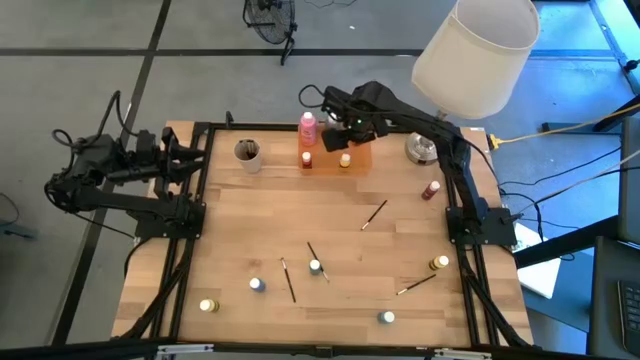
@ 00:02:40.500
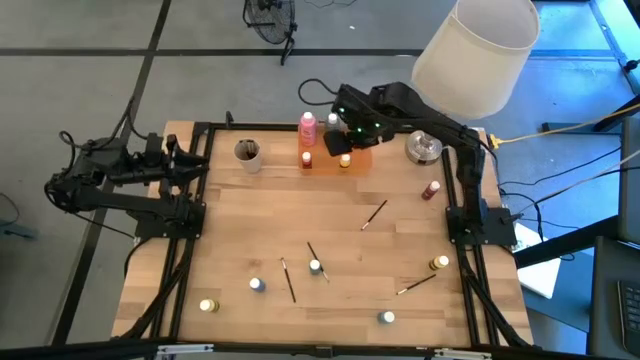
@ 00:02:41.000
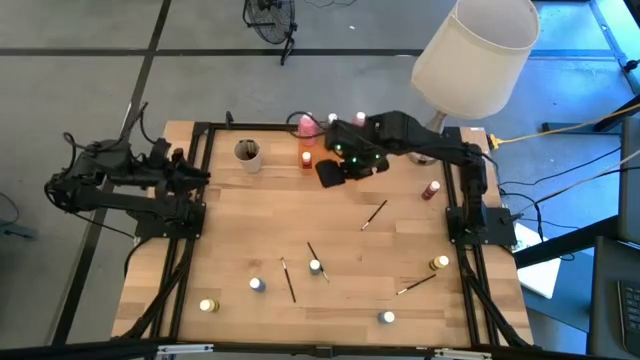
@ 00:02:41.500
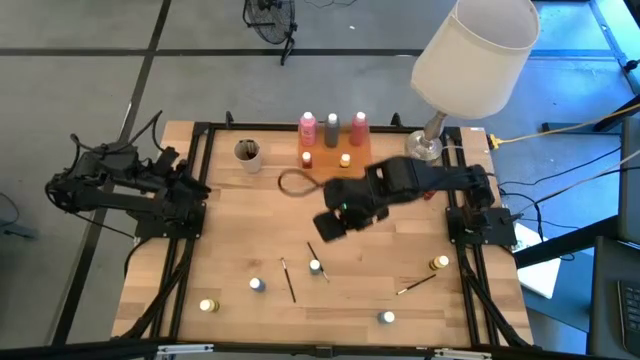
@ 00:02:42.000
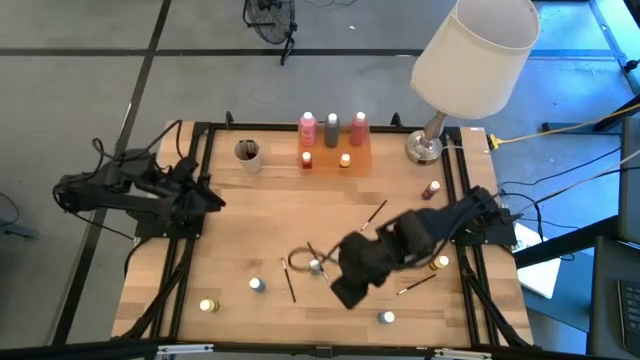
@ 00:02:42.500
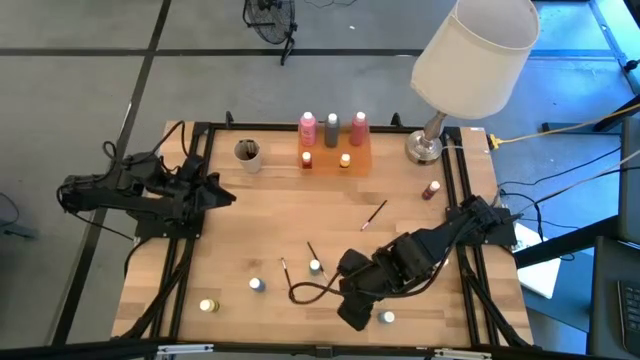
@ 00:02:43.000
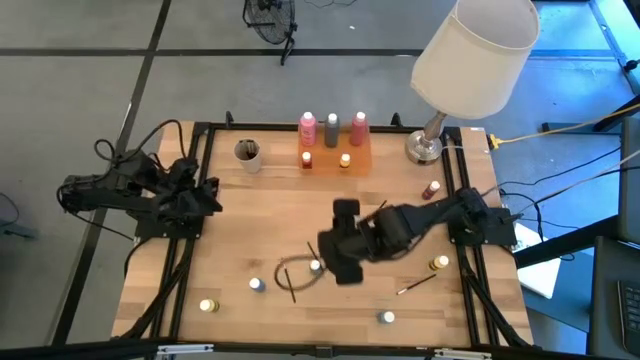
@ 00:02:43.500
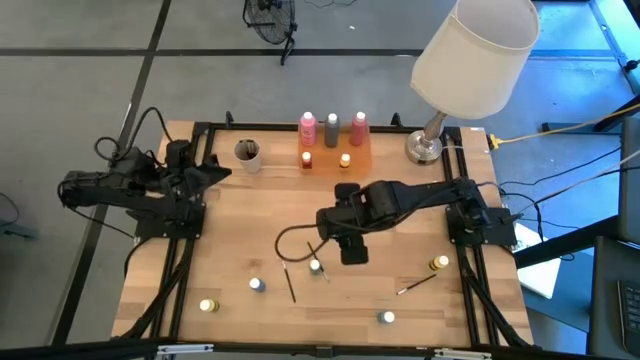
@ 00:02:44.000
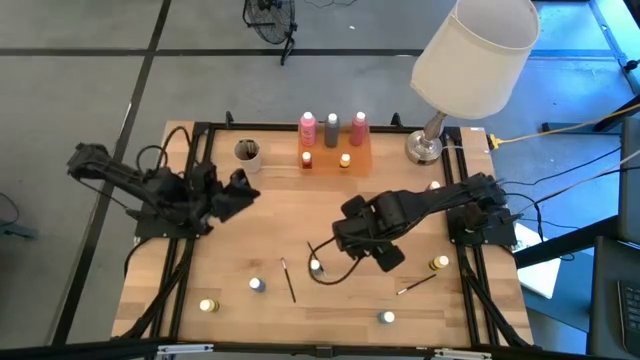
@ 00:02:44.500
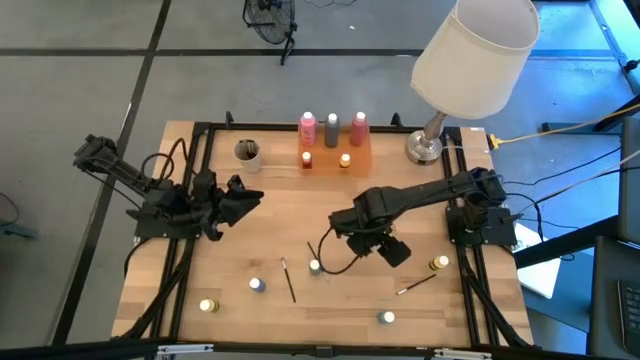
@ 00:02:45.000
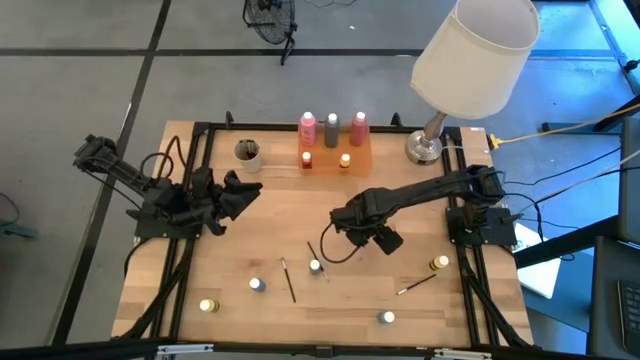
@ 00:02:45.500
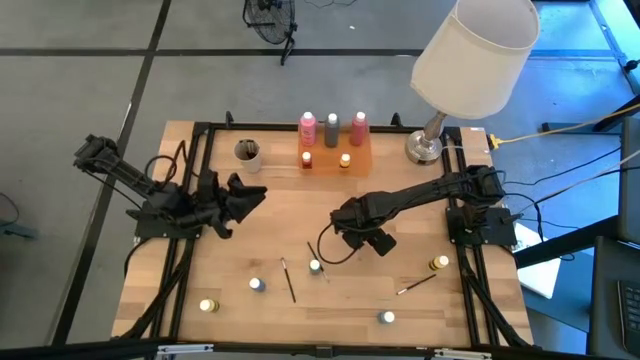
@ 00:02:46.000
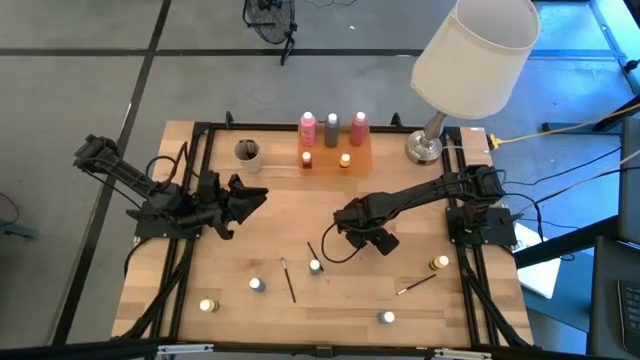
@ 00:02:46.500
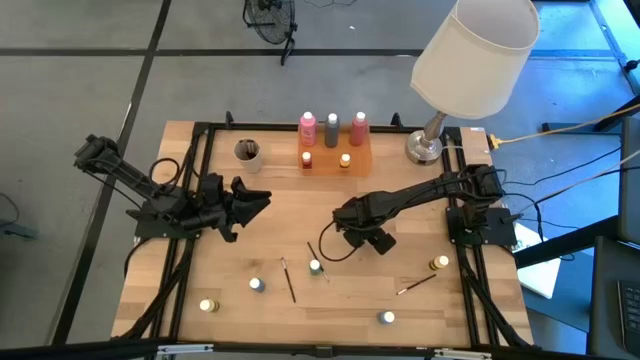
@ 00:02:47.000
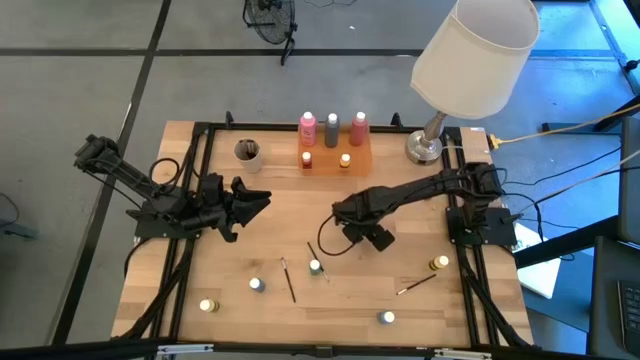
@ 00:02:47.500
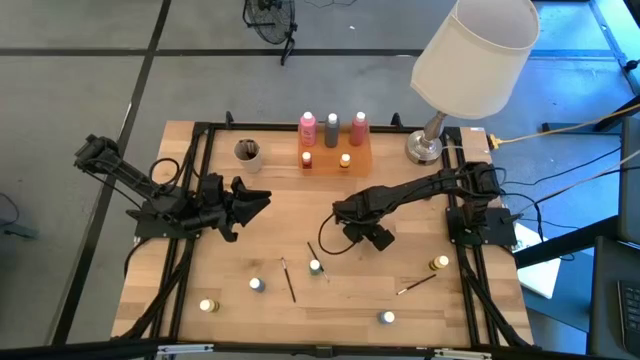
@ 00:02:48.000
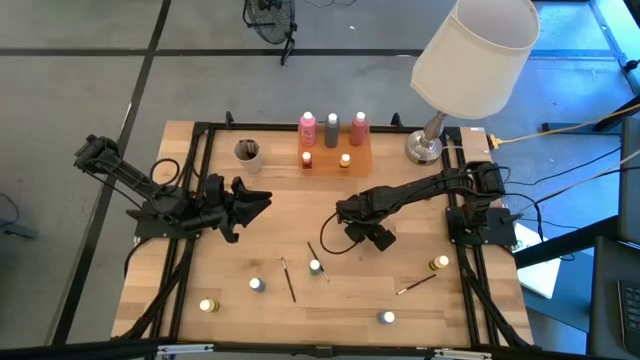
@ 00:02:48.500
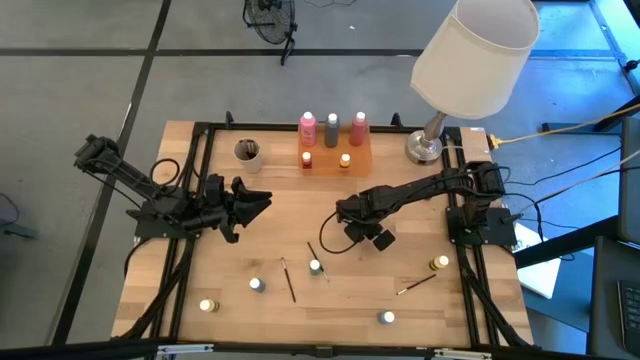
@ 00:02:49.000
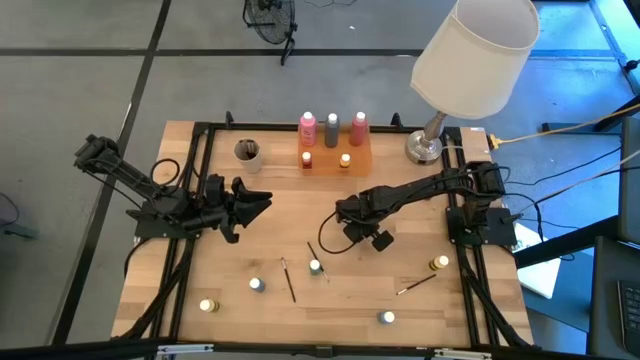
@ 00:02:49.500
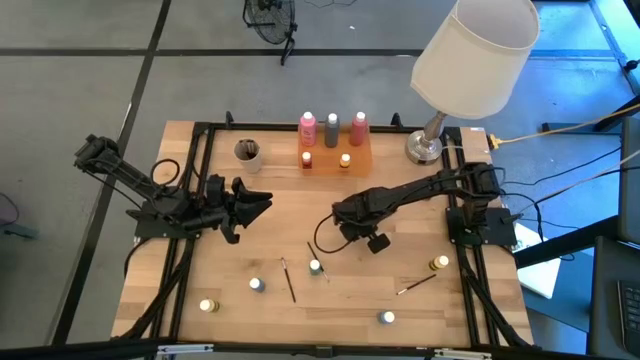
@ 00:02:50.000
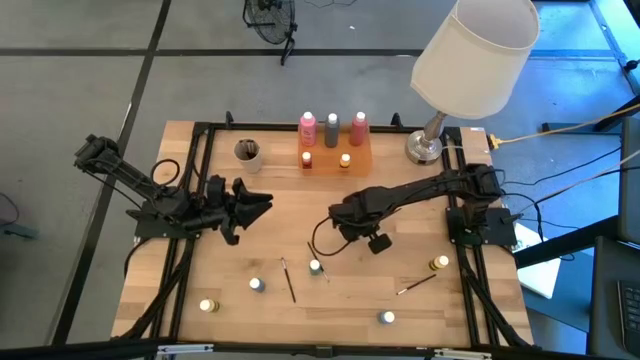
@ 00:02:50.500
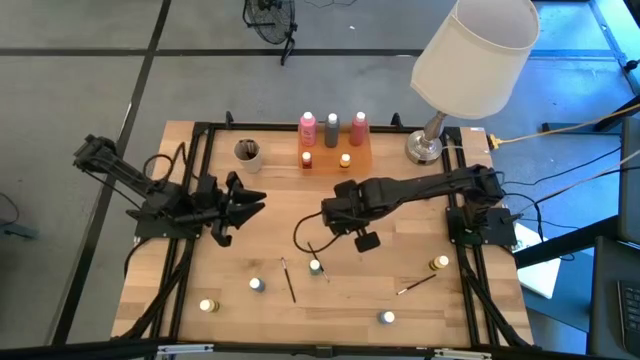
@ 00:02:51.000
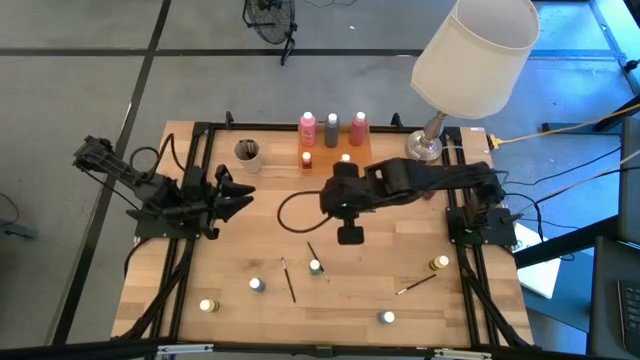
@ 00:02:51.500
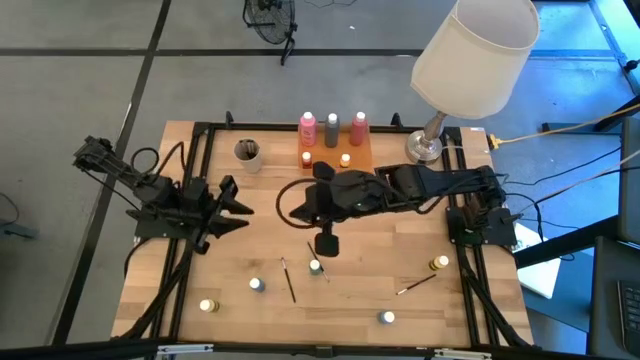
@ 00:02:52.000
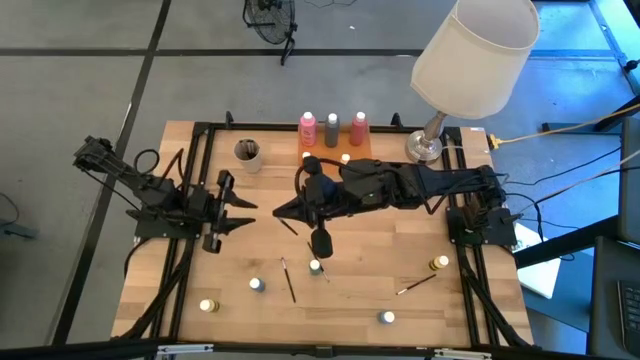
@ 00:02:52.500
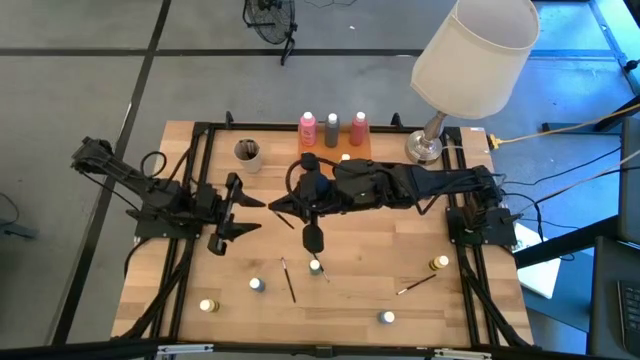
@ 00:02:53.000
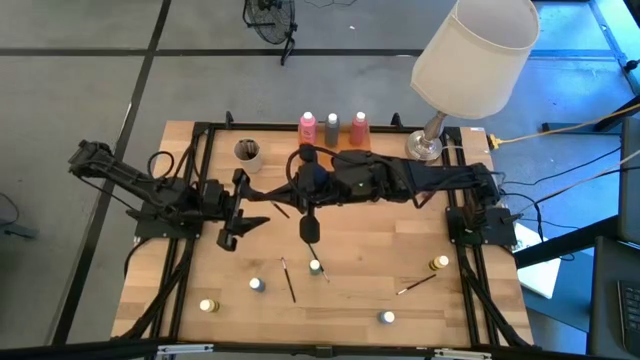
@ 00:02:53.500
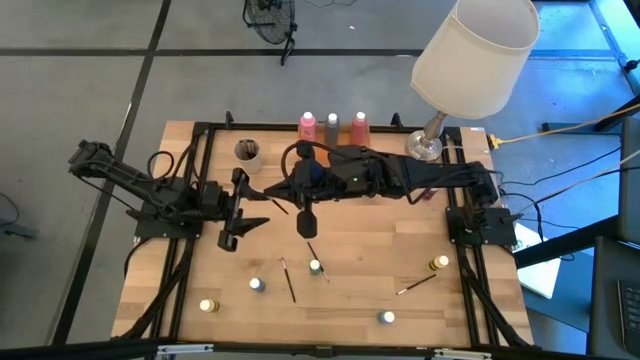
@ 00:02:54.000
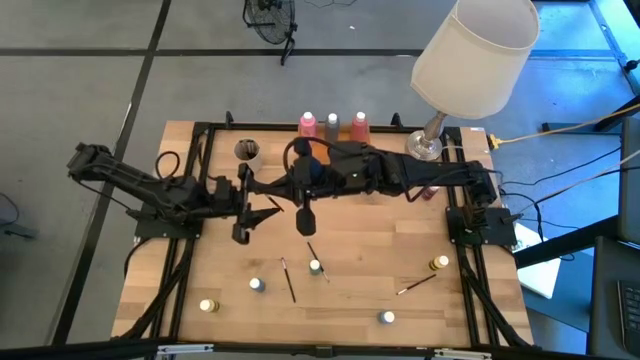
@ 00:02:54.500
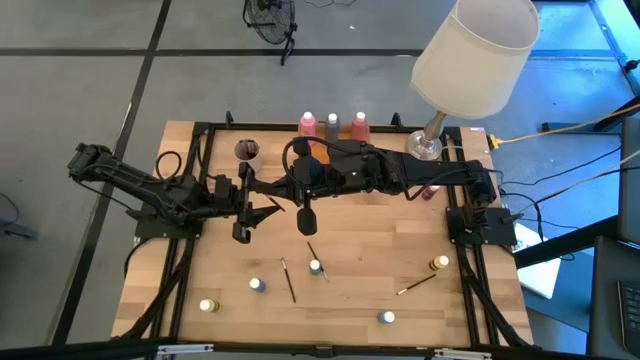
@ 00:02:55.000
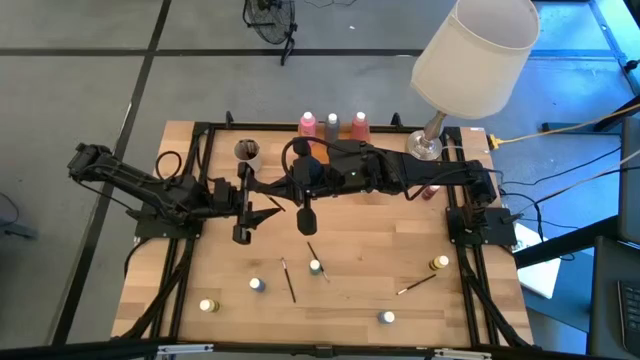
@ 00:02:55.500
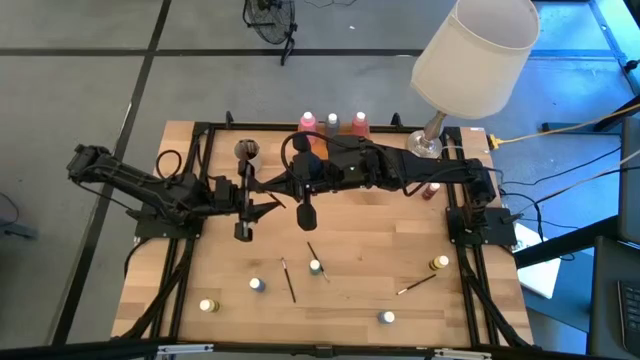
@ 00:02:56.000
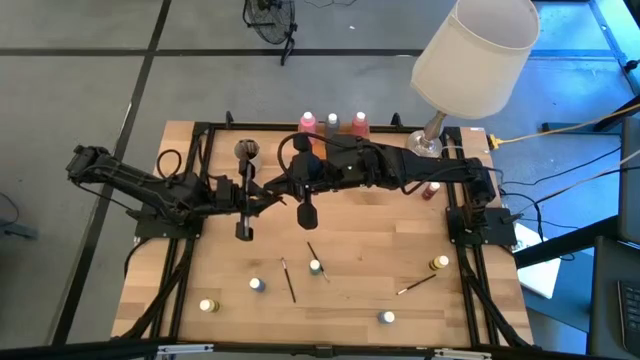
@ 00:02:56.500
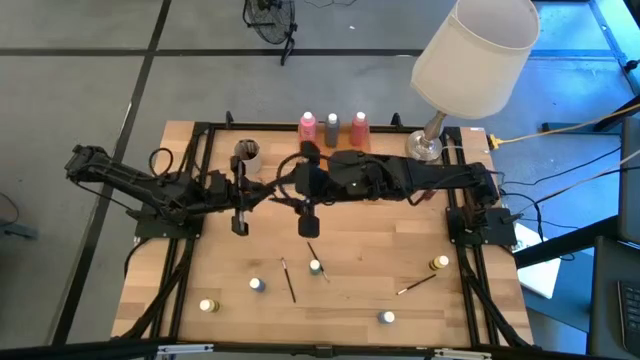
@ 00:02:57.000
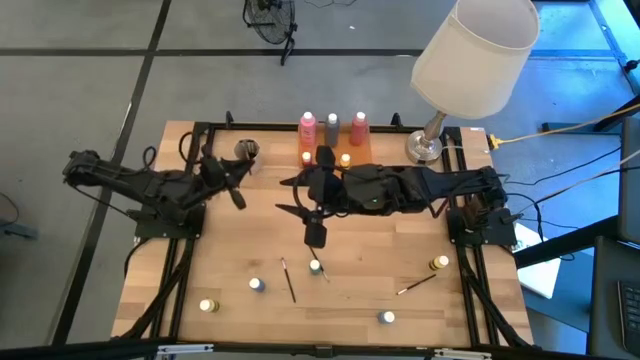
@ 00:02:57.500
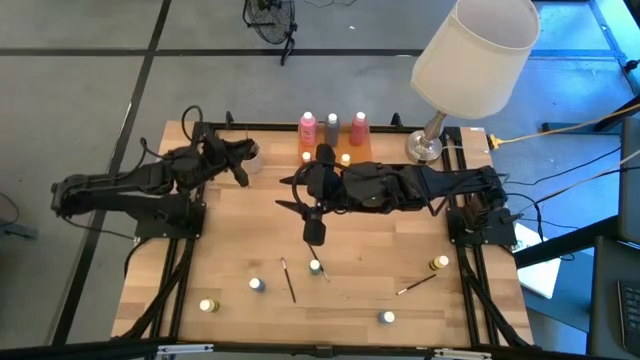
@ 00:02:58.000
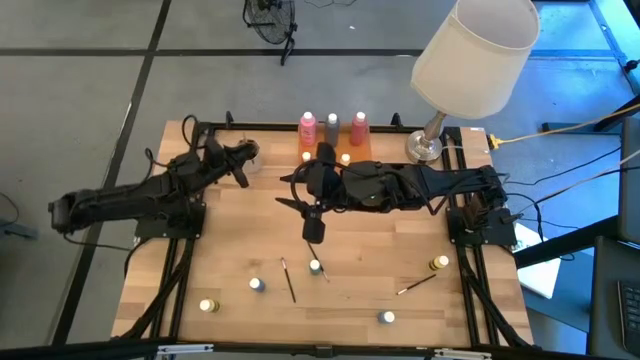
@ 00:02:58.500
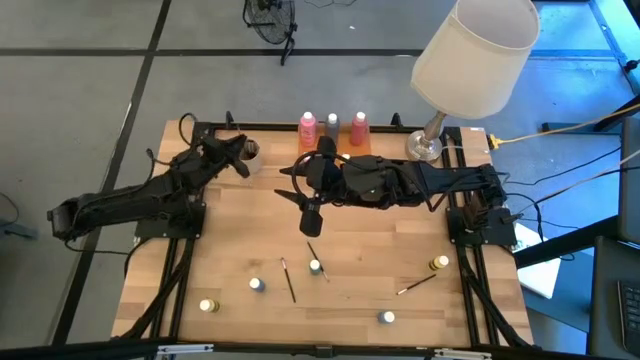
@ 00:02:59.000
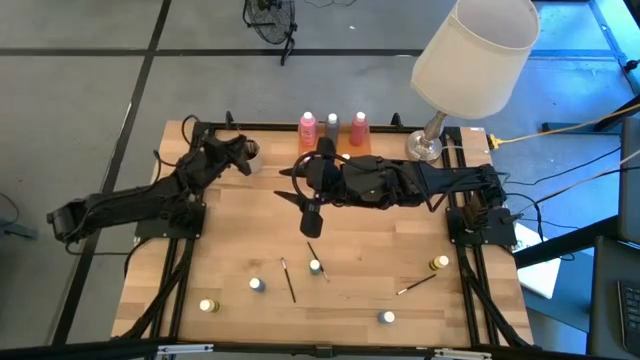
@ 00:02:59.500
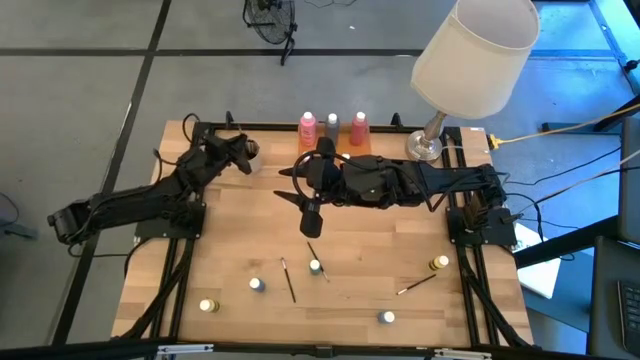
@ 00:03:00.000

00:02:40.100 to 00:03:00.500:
Task: Pick & Place Paint Supplies
Put the silver paint brush into the white cup
